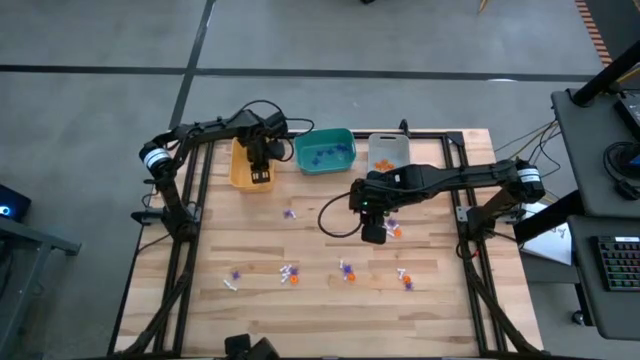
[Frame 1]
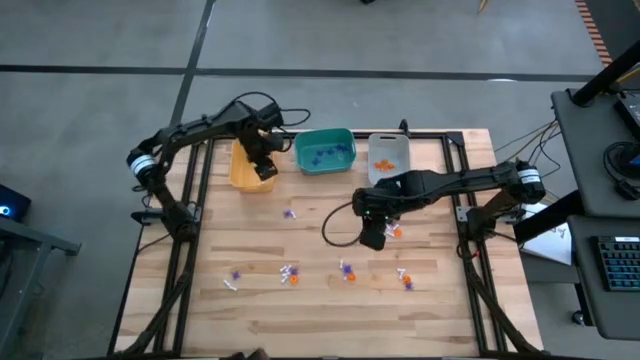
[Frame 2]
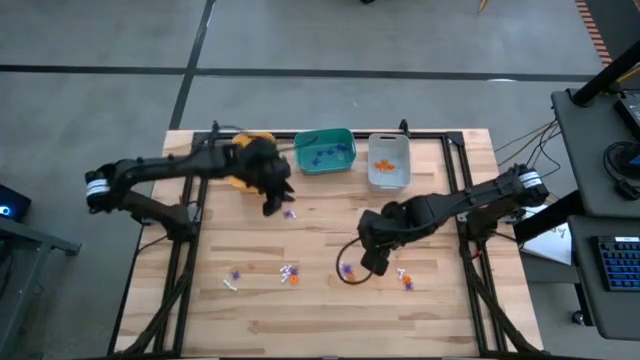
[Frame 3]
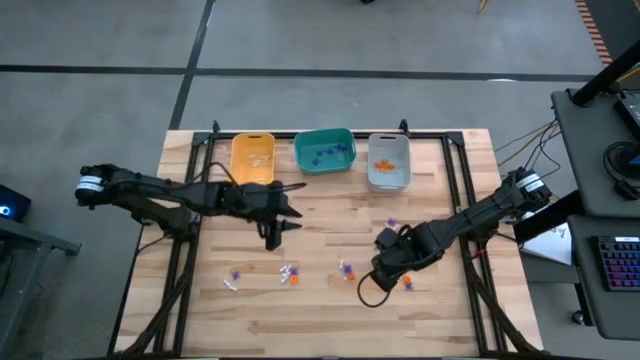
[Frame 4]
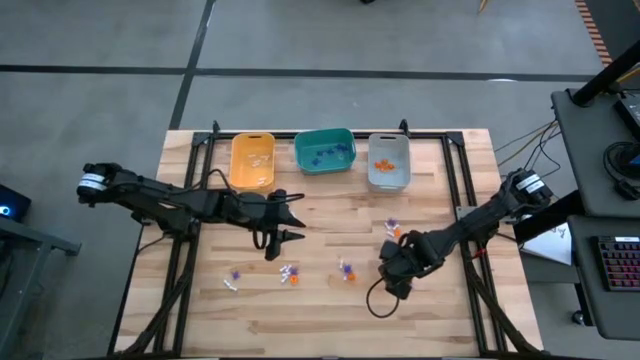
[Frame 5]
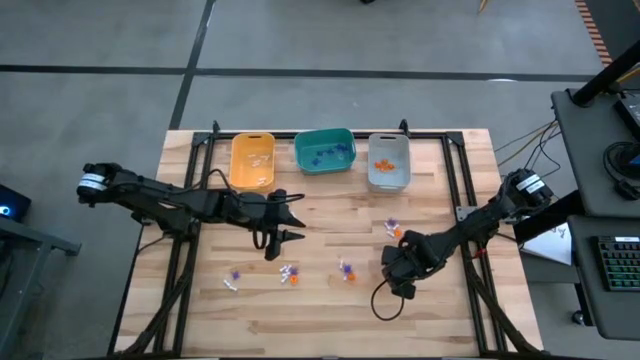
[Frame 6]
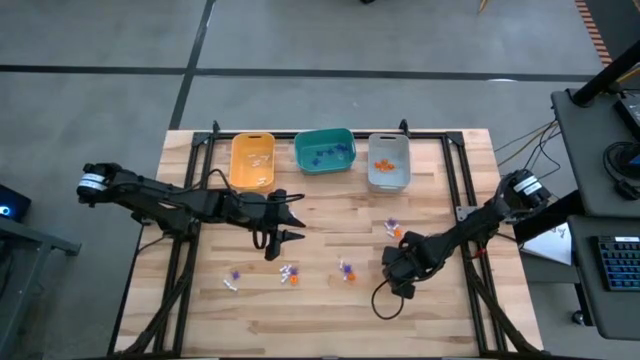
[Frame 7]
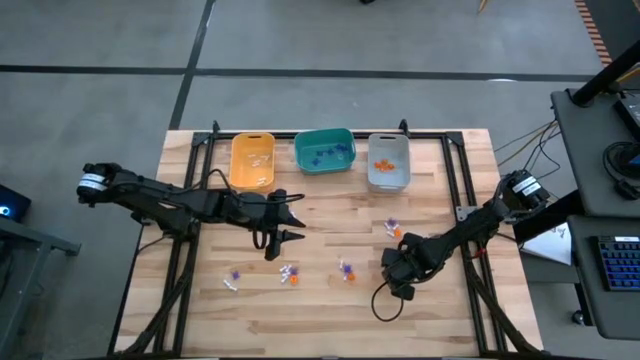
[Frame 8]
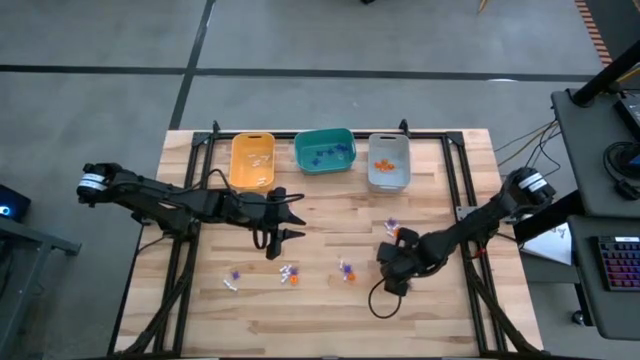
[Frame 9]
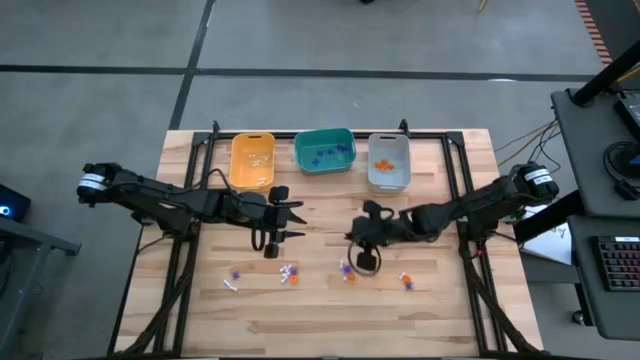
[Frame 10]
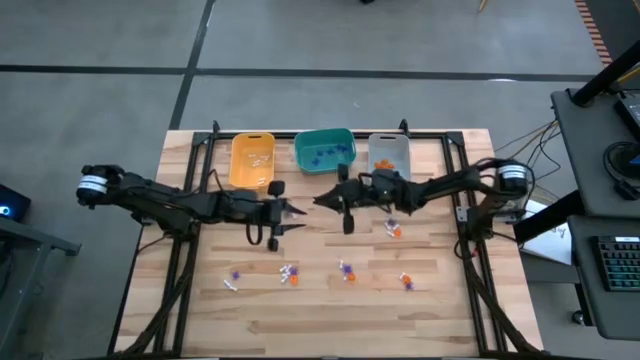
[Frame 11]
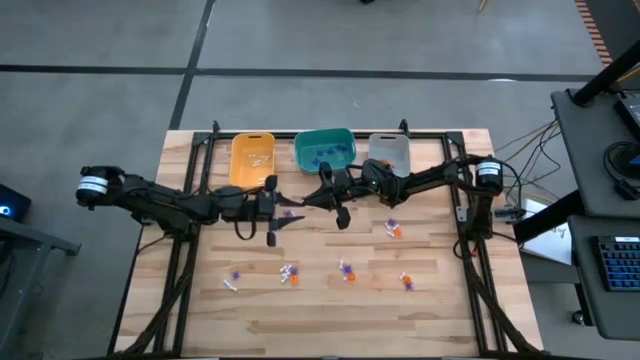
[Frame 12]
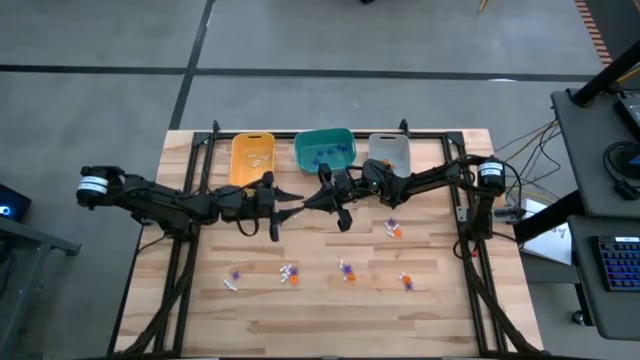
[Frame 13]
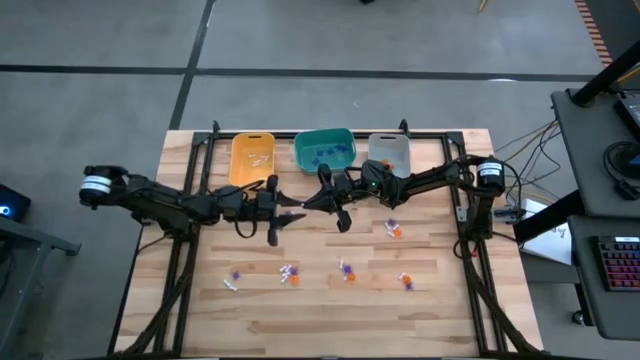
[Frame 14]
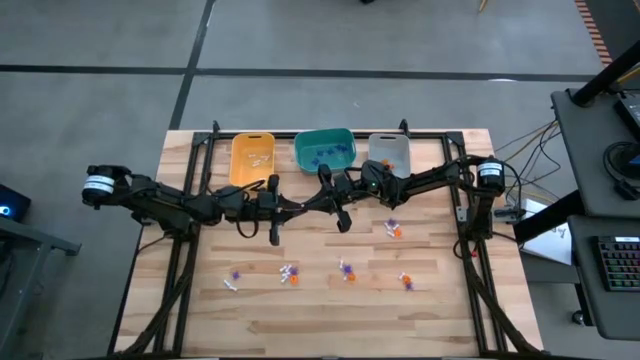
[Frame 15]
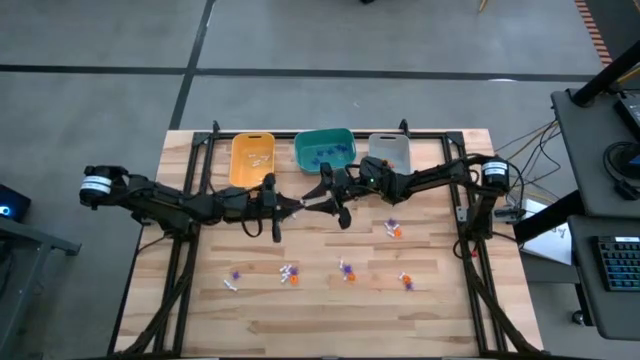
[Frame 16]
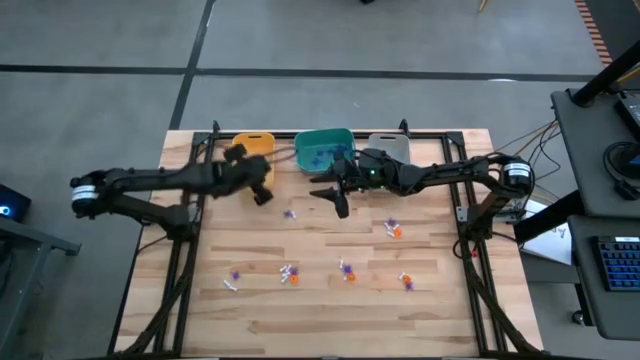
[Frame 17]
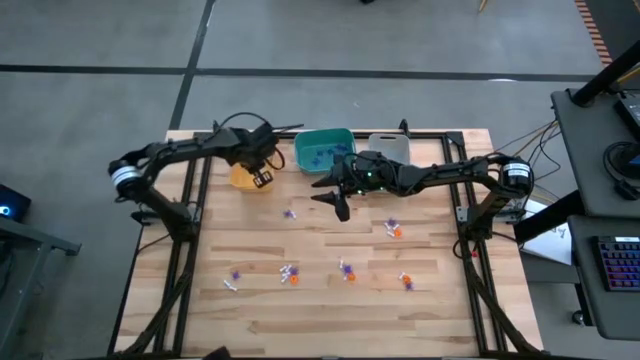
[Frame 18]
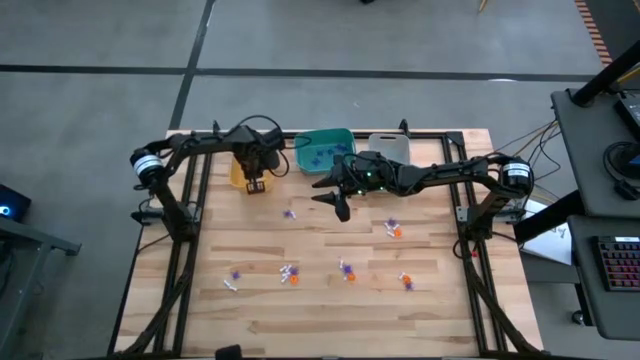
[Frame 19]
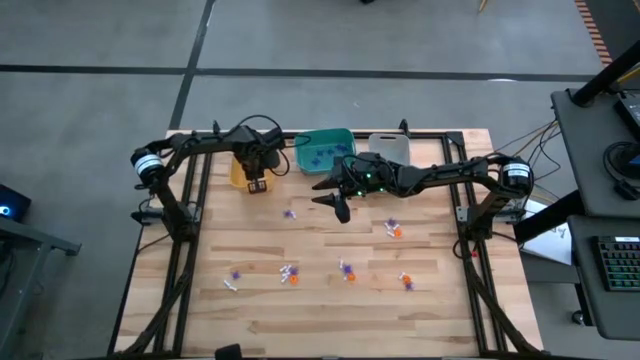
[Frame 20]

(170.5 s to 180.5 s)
Task: Sort Halloween decoration
Put the white bone toy into the yellow bin

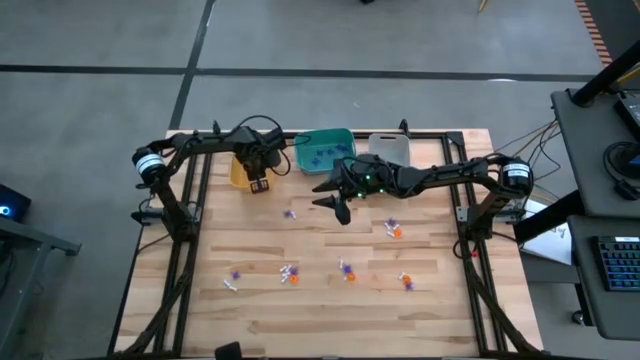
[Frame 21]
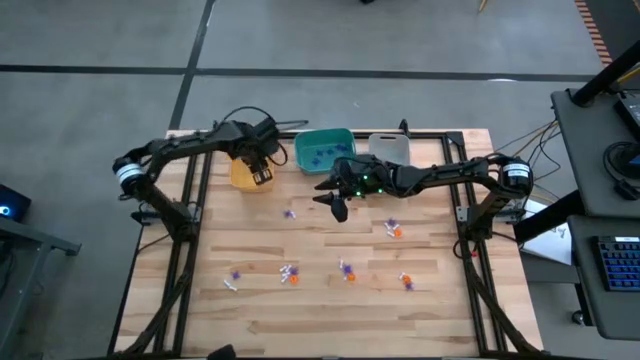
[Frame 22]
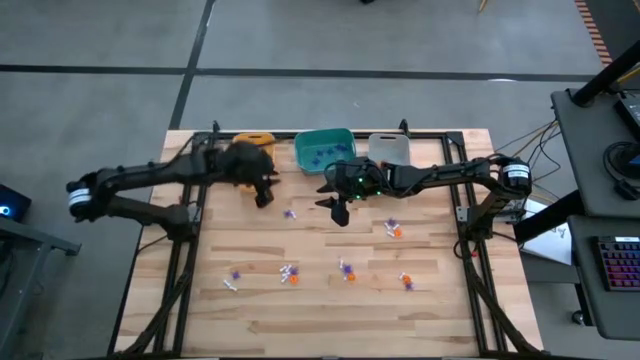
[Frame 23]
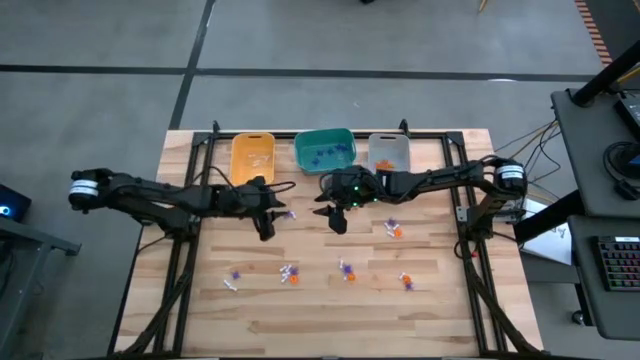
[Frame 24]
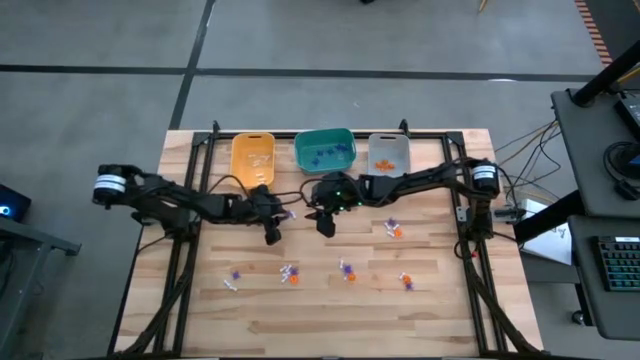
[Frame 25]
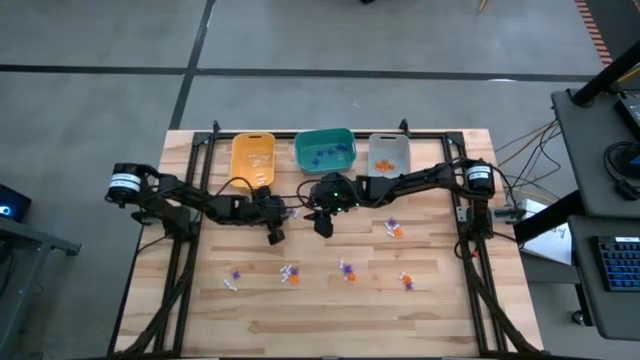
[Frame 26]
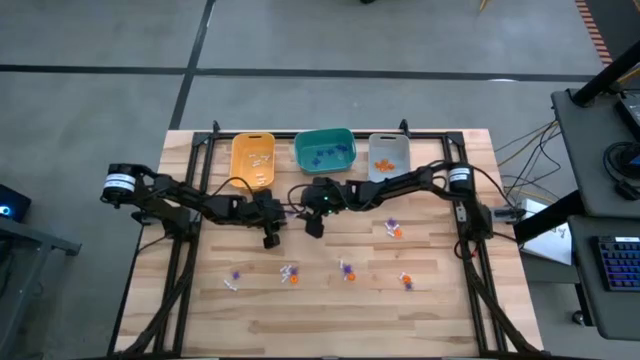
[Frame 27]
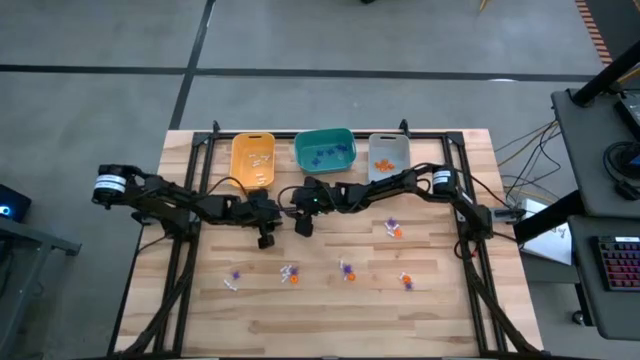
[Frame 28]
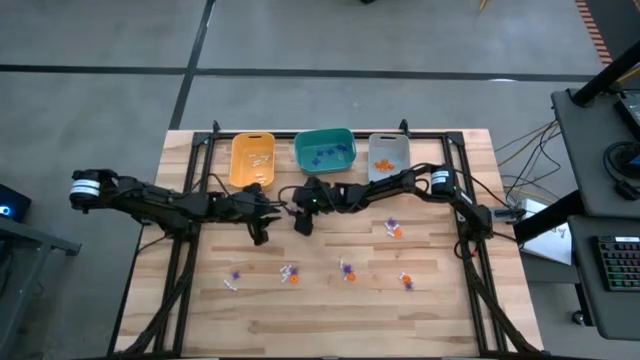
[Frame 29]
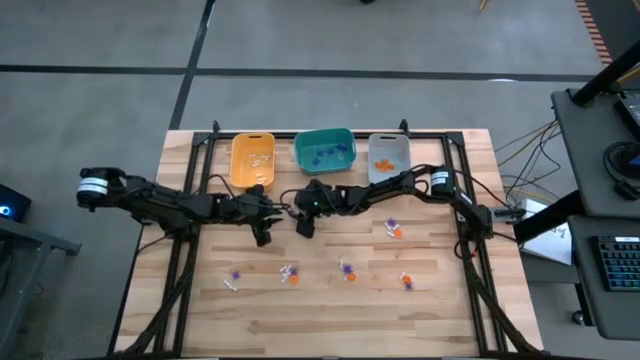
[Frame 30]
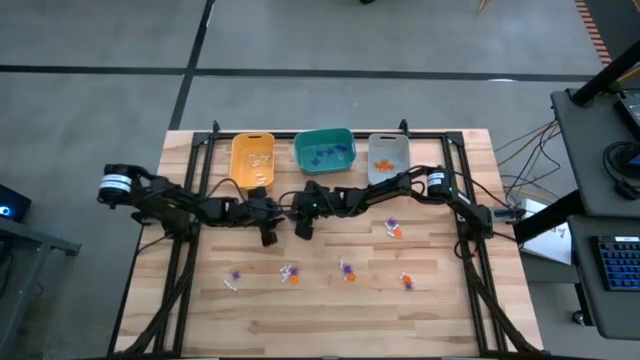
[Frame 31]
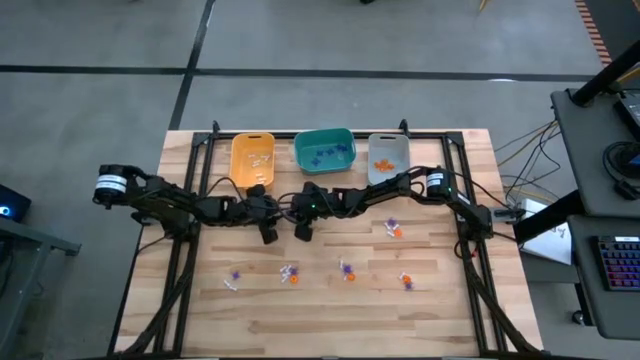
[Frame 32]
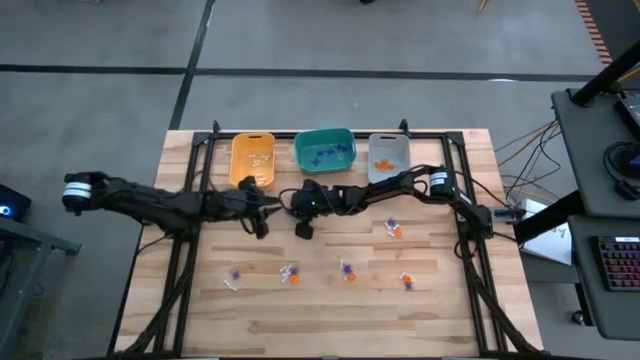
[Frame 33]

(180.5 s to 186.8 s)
Put the violet spider toy into the green bin

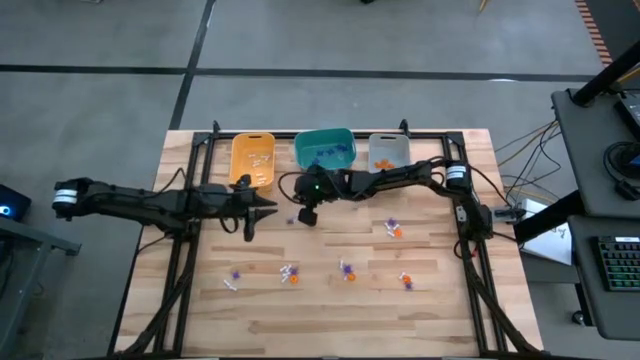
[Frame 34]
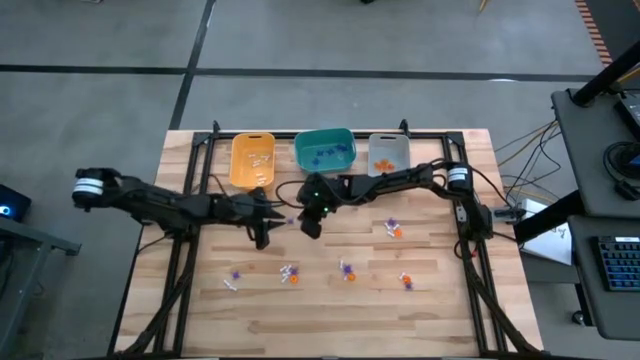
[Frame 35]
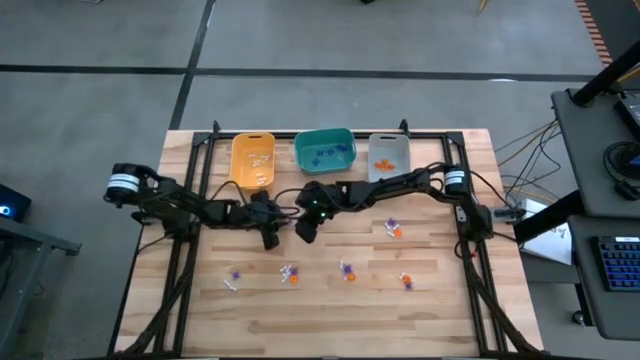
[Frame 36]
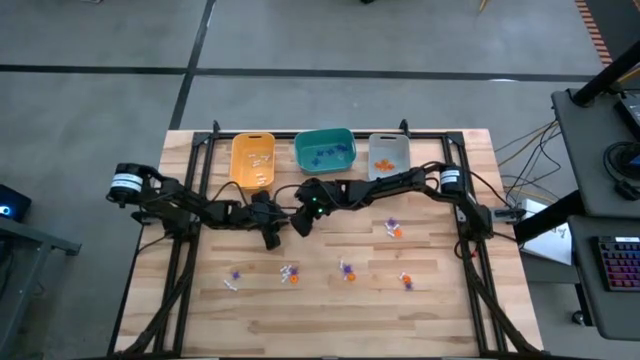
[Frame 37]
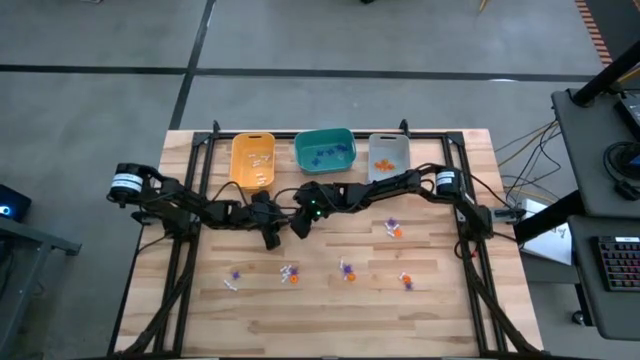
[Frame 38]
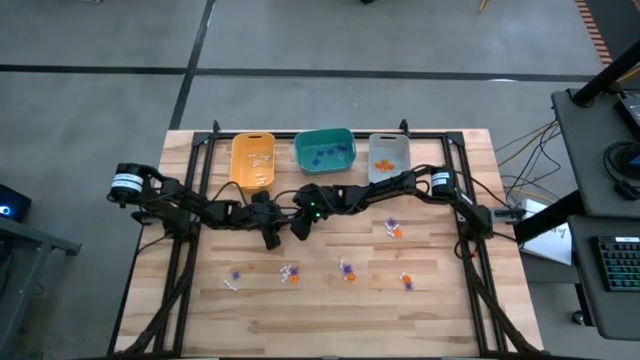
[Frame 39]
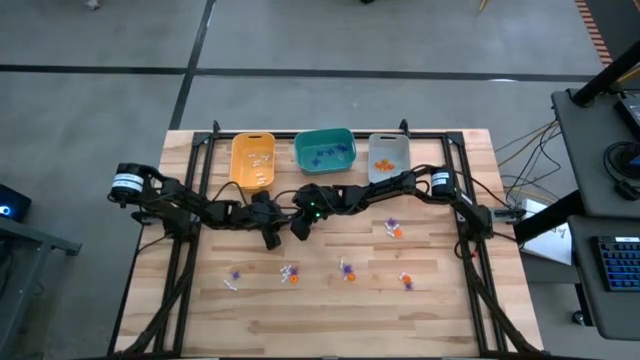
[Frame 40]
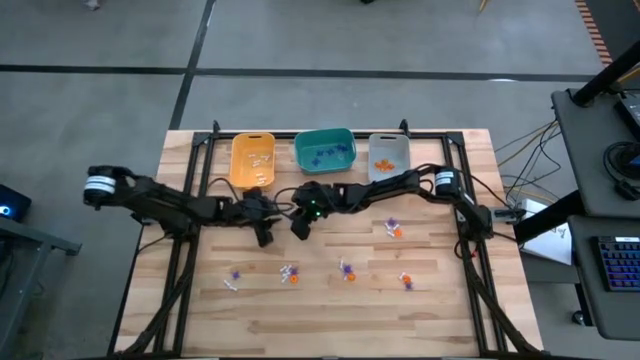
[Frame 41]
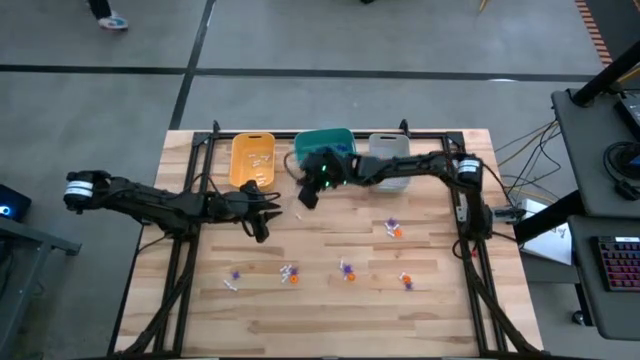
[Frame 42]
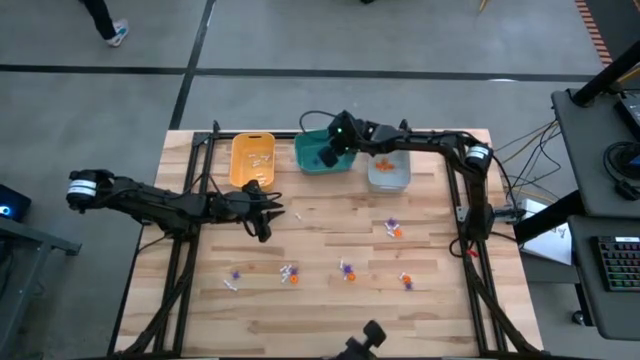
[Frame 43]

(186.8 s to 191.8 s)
Put the violet spider toy into the green bin
